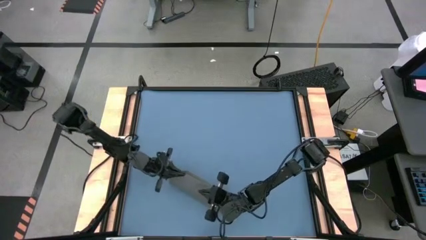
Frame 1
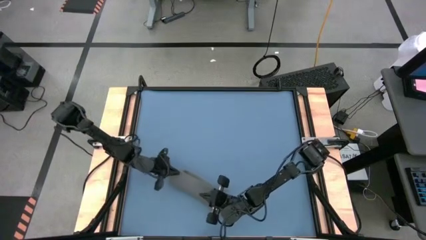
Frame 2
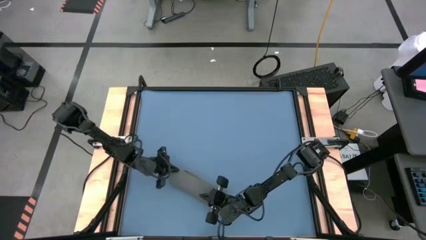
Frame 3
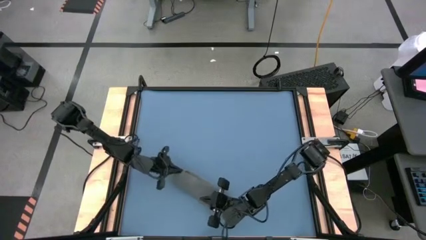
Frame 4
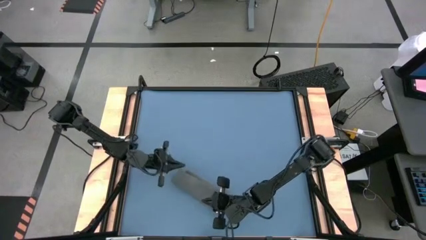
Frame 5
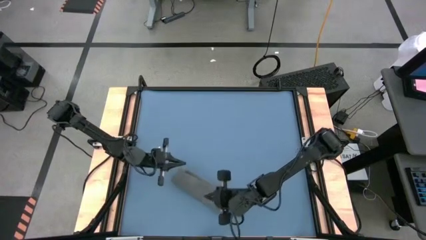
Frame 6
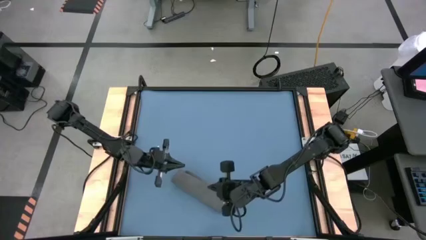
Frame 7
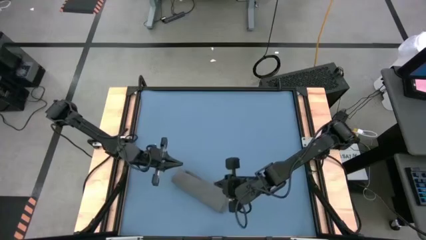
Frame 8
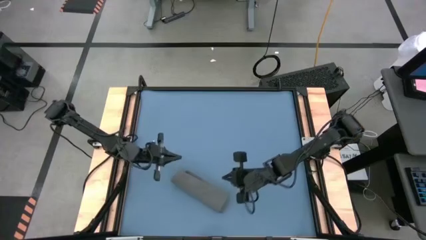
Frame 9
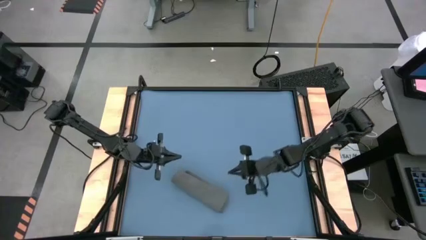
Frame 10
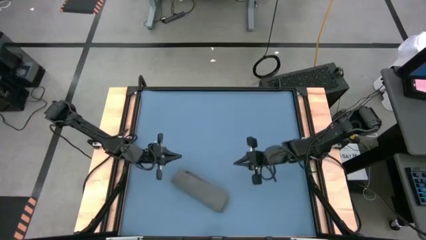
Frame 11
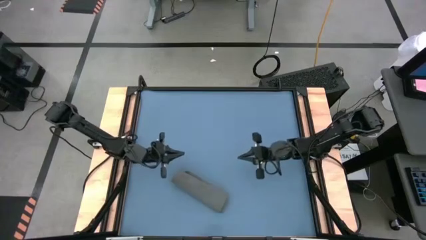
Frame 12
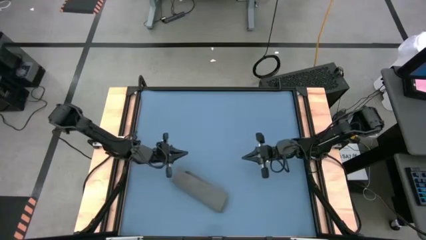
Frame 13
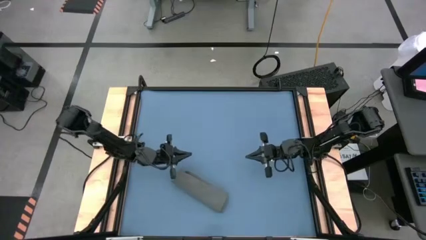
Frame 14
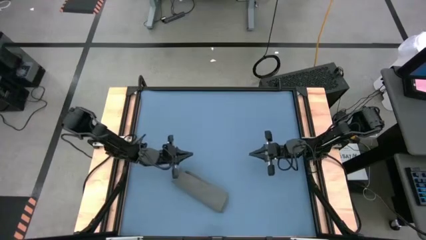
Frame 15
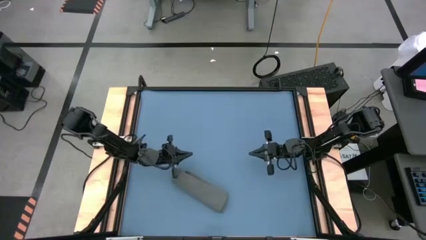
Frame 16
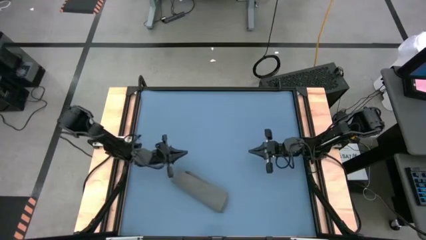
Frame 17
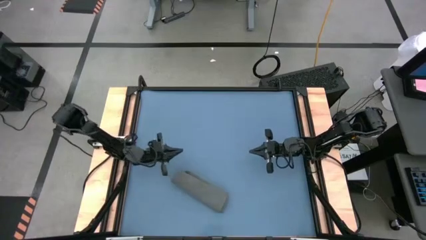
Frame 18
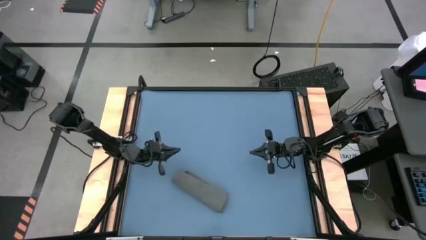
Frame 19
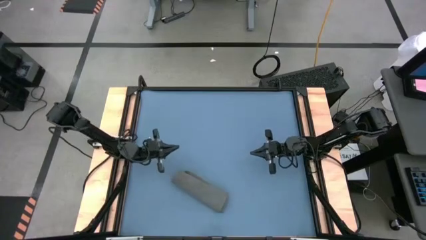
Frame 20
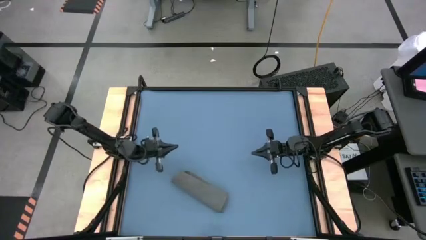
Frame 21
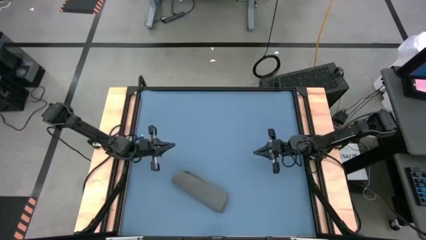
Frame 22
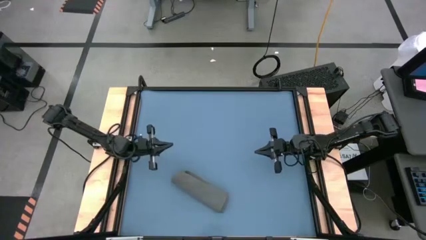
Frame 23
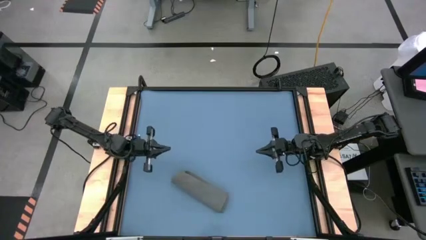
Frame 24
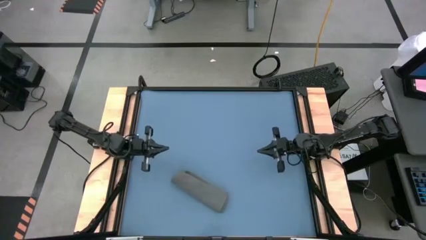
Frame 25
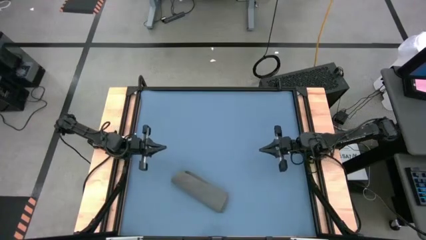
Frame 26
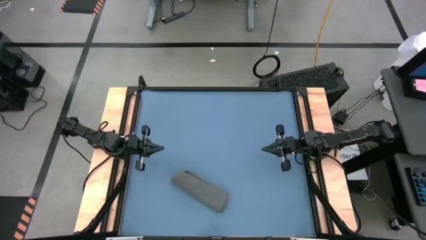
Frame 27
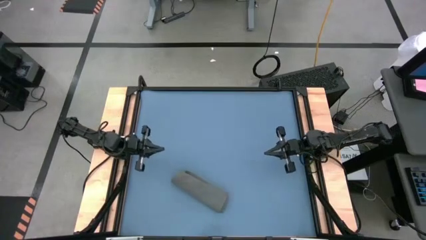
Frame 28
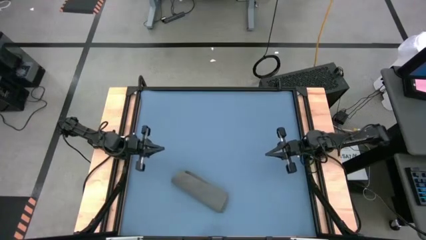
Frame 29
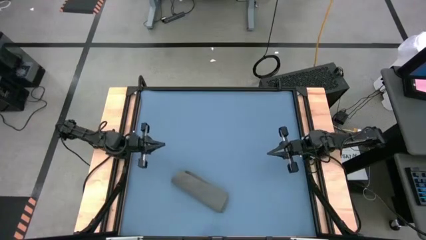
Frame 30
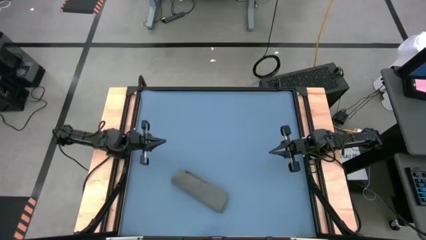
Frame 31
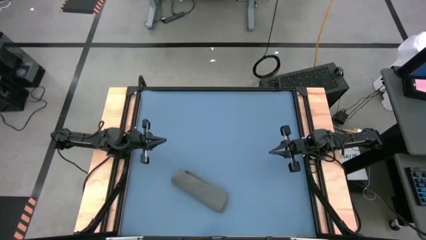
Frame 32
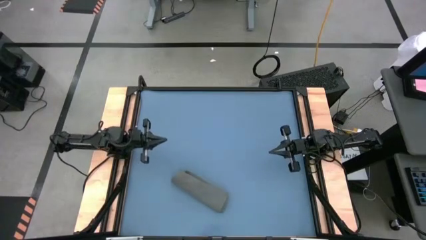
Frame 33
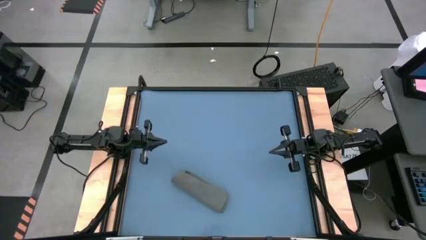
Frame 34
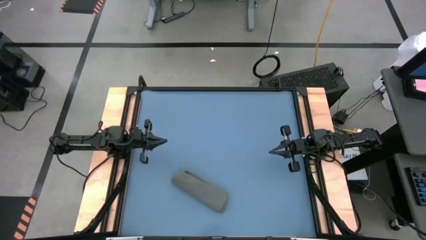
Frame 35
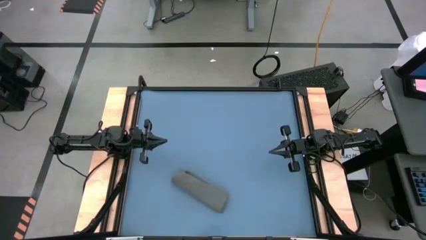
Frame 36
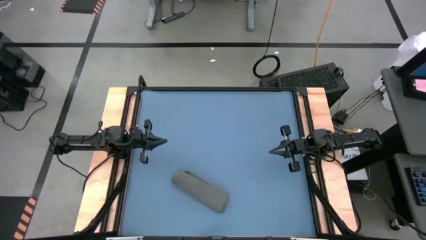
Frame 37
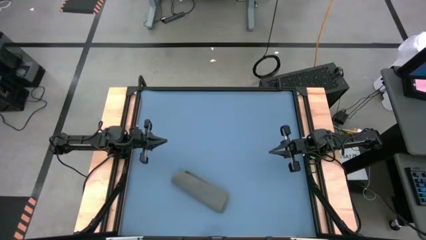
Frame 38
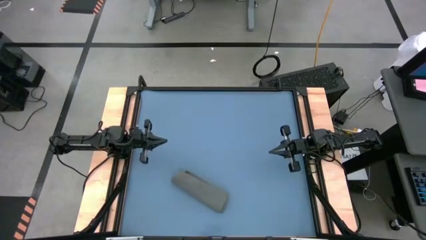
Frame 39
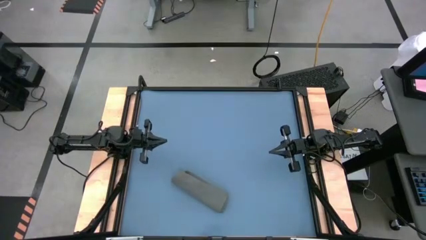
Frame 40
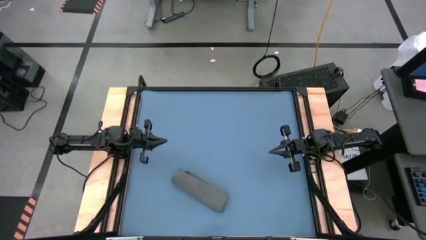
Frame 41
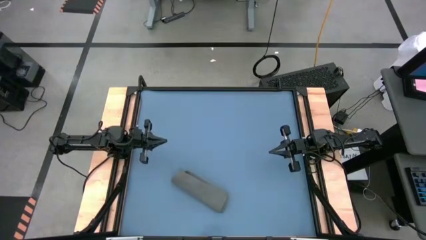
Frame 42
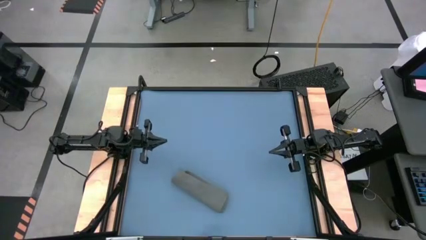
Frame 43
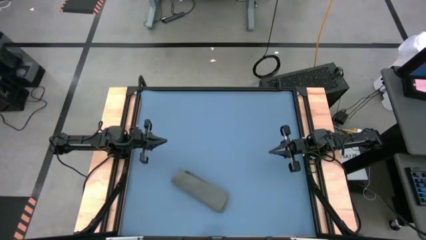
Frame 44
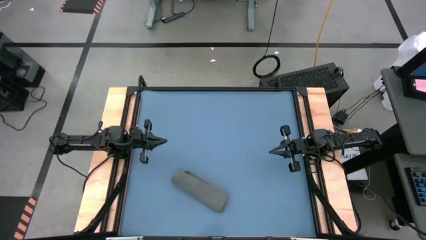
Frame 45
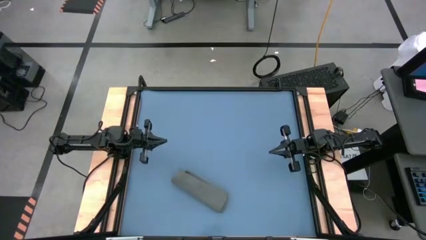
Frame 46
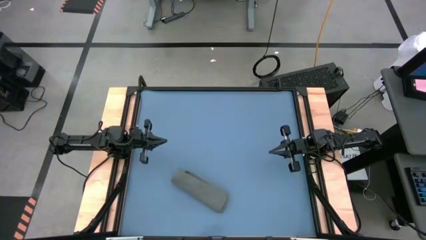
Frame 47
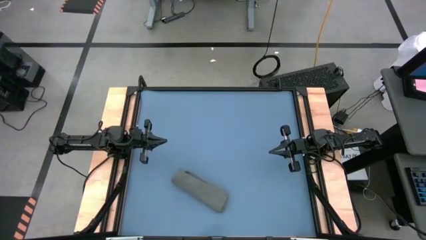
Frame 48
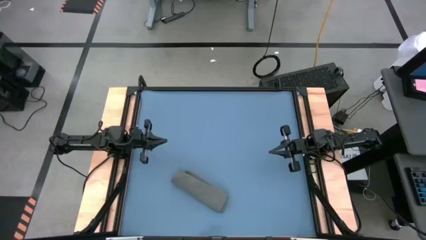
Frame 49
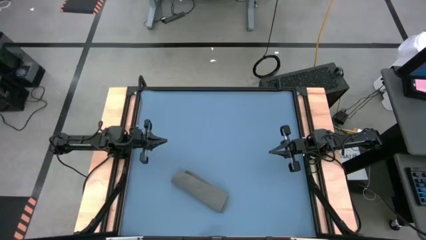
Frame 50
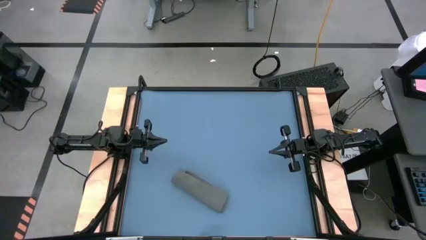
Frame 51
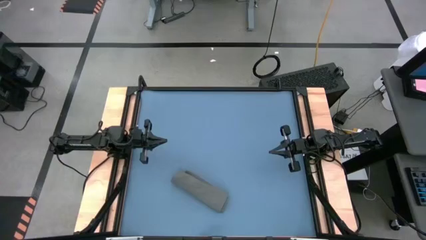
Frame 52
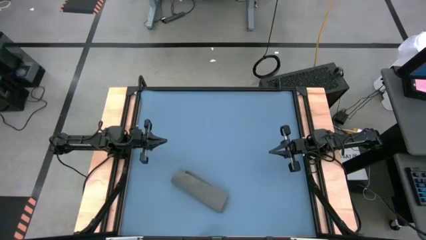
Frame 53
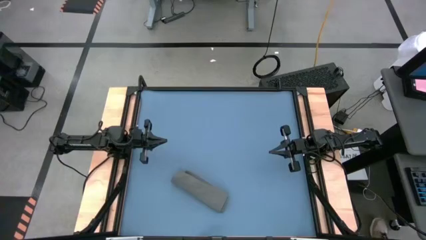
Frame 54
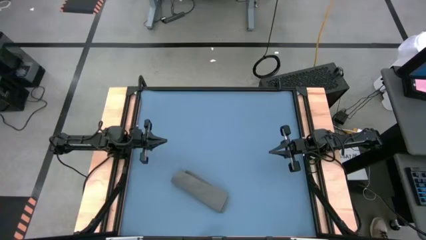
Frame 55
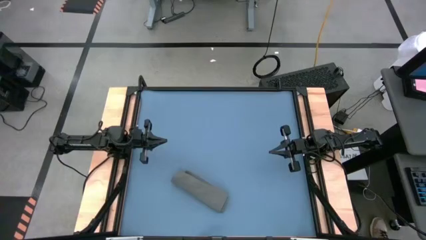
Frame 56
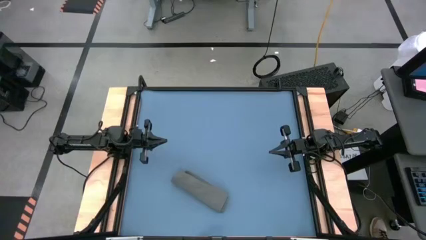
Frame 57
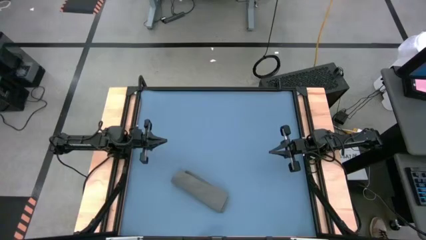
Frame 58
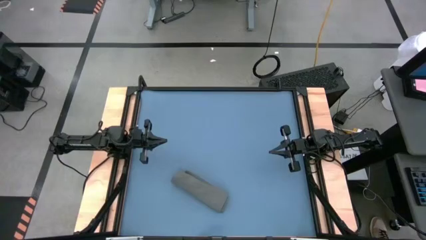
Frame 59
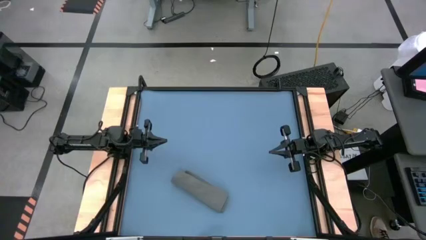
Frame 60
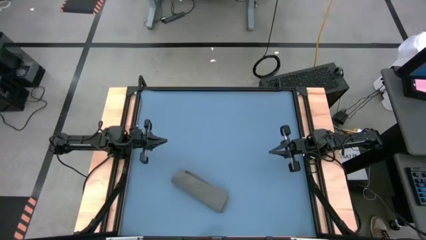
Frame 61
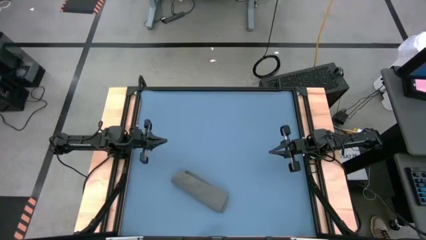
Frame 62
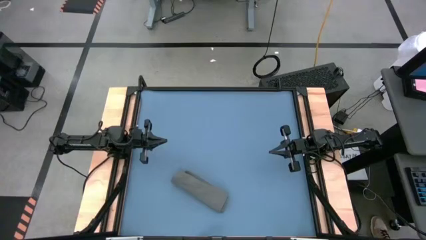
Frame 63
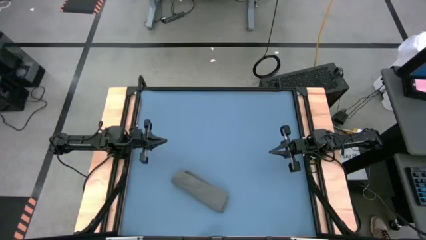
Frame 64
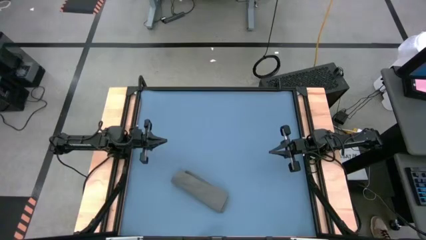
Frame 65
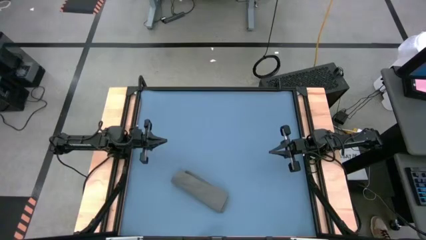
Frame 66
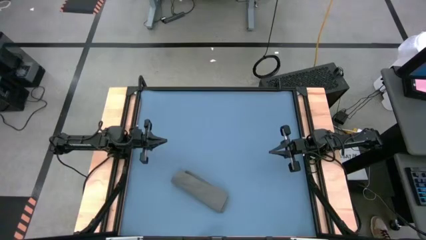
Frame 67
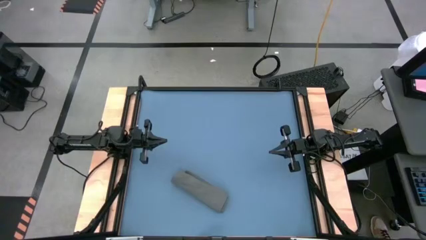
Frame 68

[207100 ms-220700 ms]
Task: Roll towel
Return to Home Position

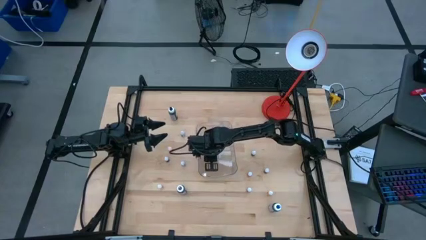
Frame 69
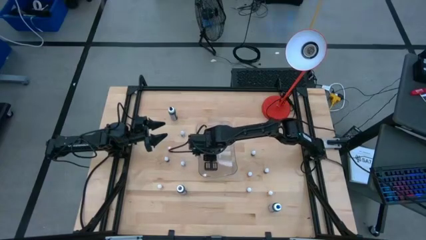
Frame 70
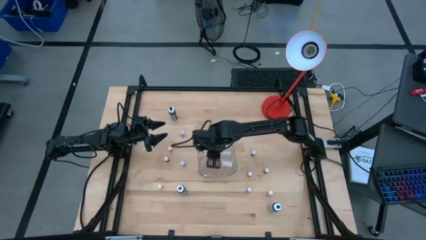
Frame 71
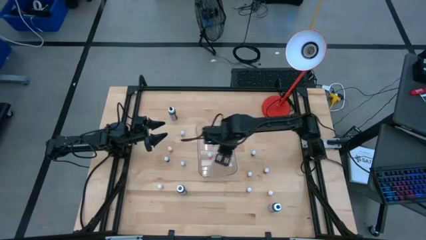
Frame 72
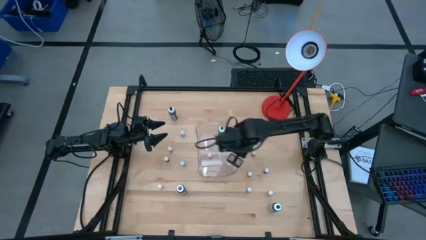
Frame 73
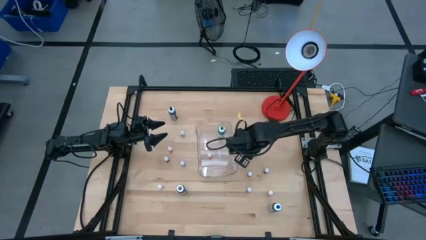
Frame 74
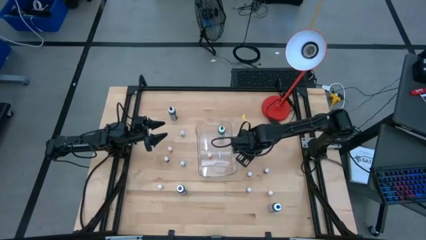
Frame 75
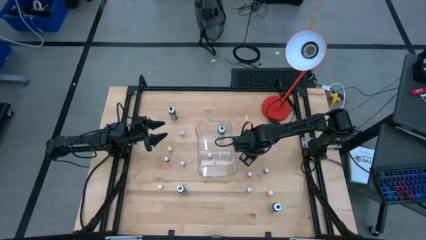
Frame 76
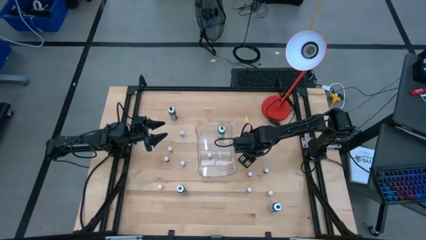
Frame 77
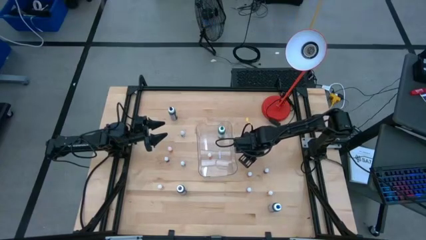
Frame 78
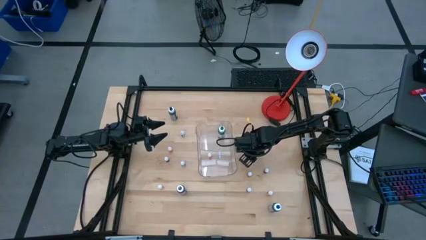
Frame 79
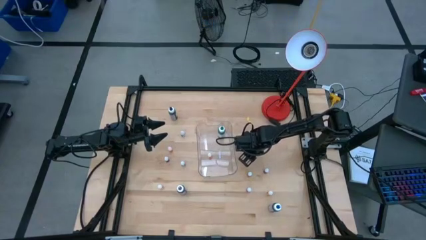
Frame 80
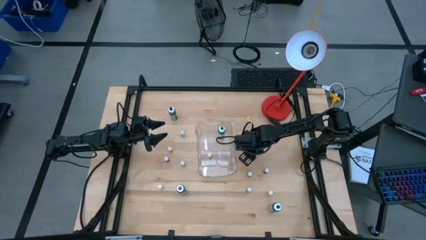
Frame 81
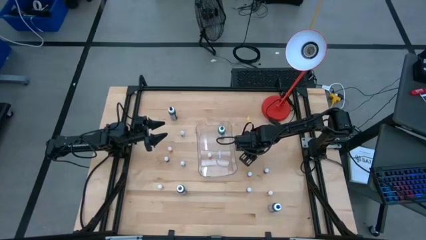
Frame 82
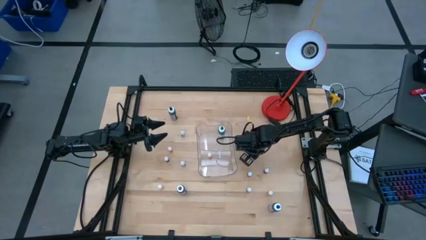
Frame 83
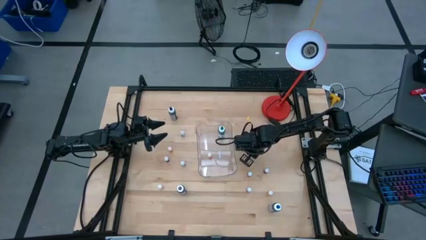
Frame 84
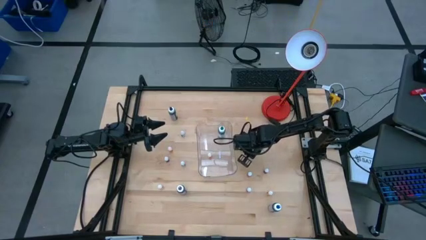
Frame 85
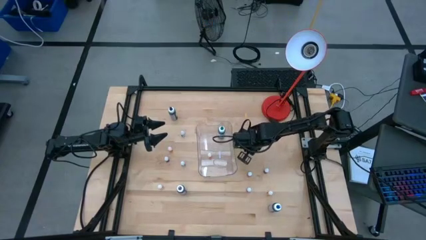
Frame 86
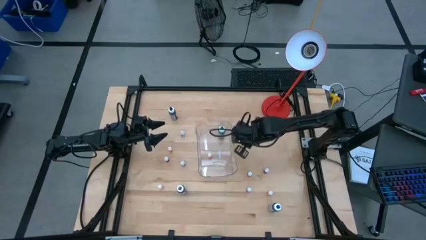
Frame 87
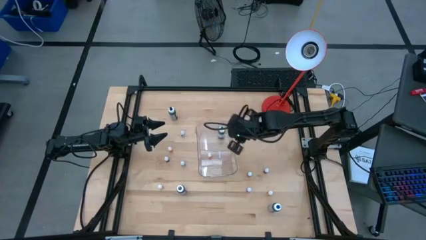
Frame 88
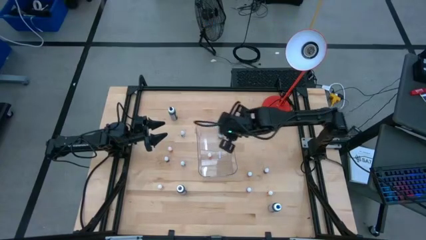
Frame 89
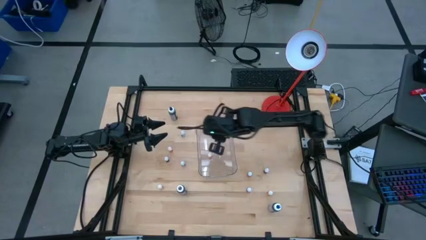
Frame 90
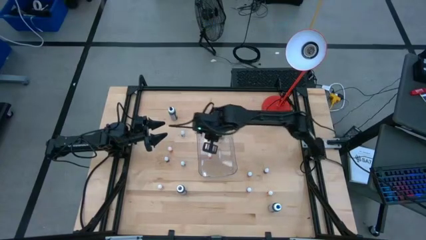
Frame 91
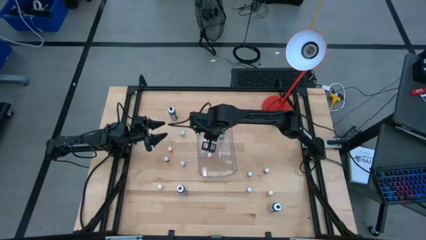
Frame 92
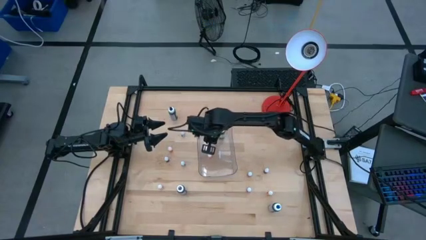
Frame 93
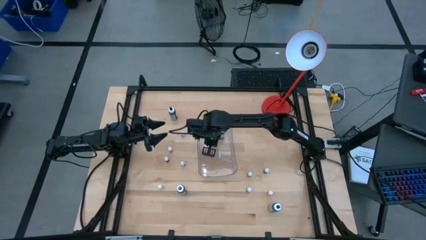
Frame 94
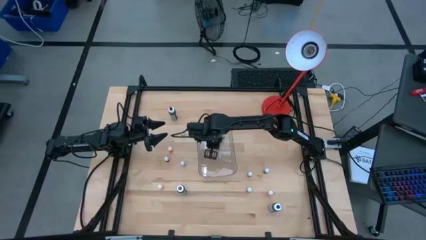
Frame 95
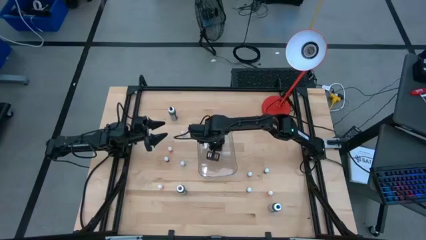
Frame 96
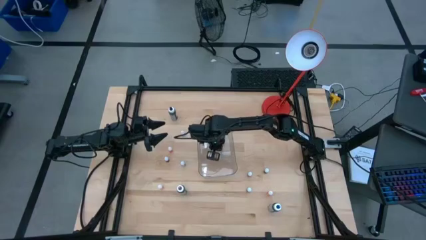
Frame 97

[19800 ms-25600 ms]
Task: Pick & Place food coloring
Put the small black food coloring bottle into the transparent bin
